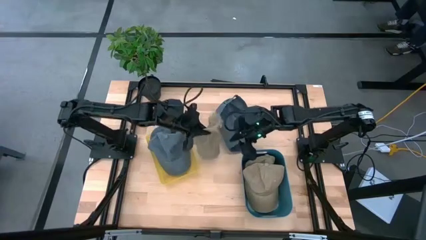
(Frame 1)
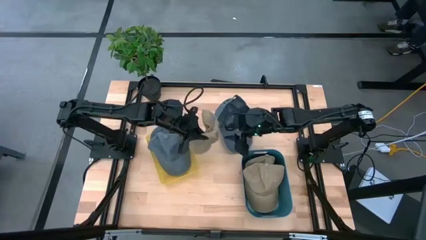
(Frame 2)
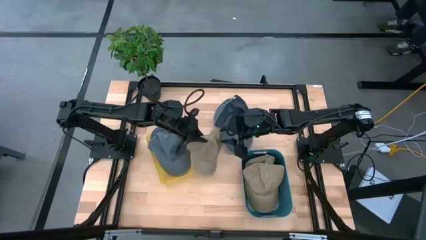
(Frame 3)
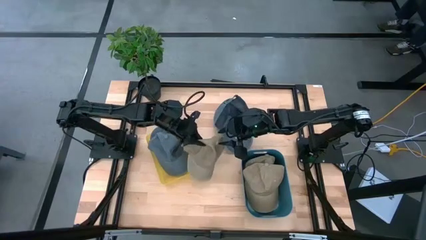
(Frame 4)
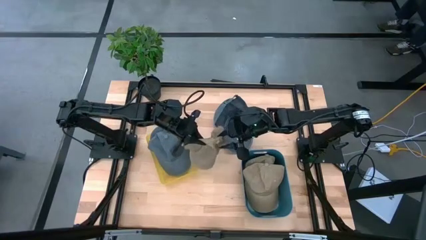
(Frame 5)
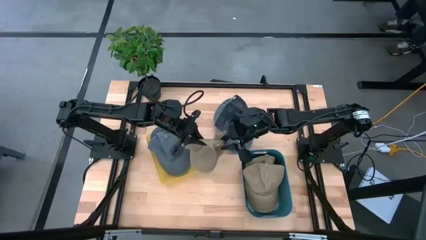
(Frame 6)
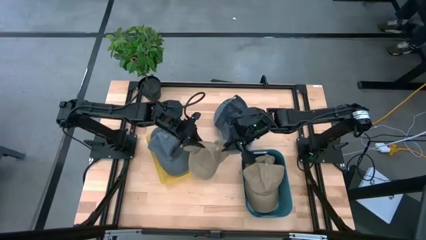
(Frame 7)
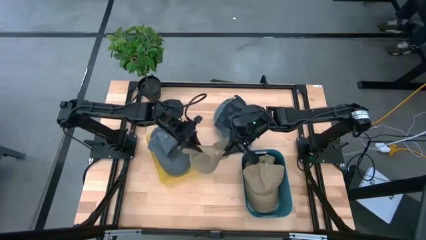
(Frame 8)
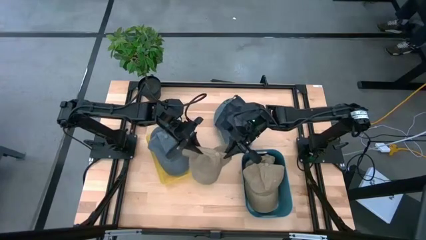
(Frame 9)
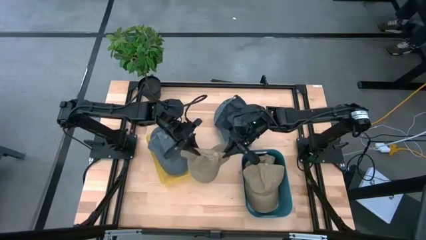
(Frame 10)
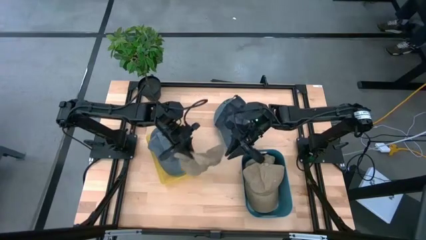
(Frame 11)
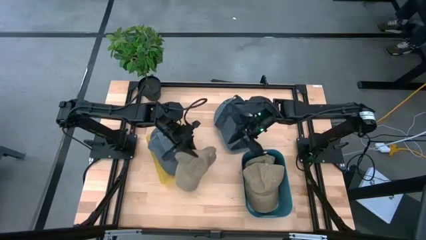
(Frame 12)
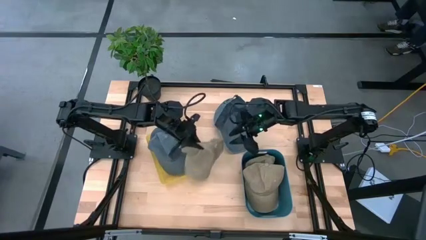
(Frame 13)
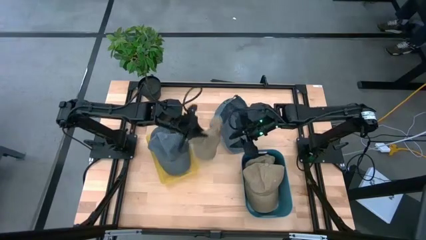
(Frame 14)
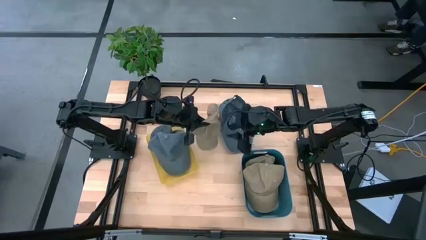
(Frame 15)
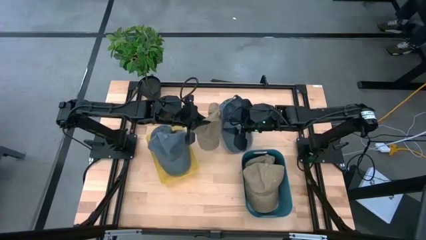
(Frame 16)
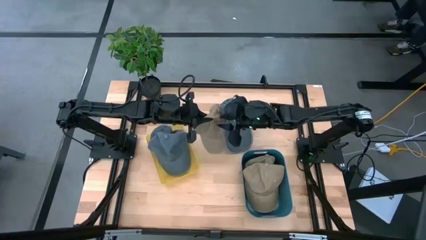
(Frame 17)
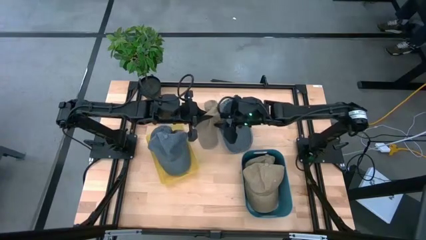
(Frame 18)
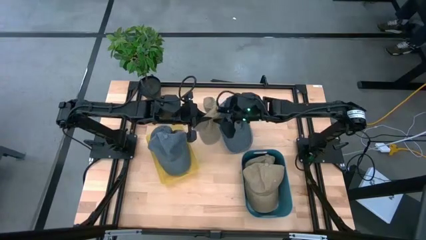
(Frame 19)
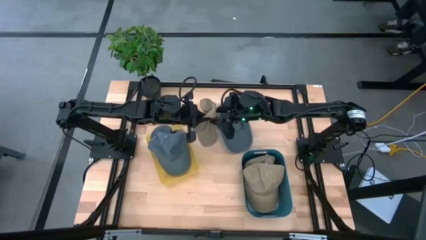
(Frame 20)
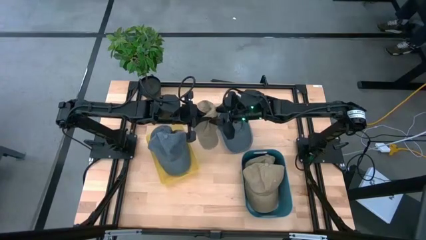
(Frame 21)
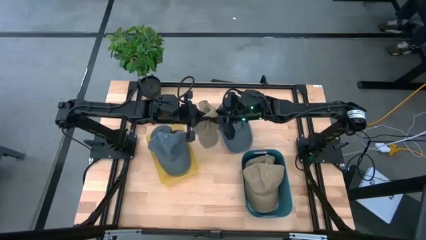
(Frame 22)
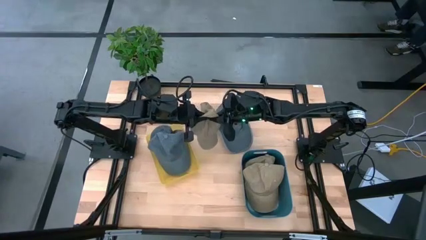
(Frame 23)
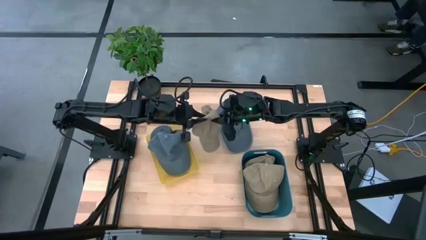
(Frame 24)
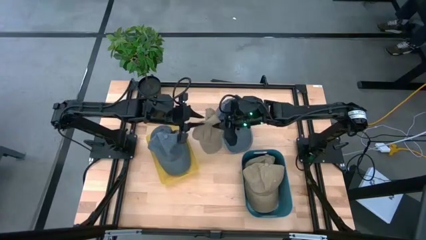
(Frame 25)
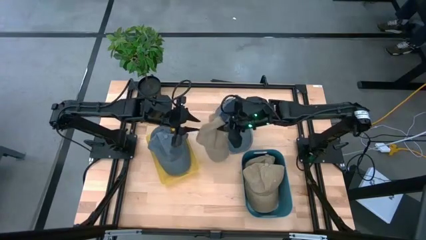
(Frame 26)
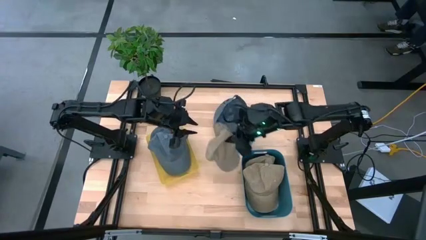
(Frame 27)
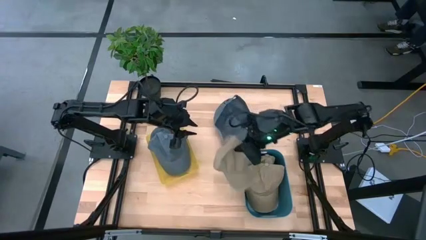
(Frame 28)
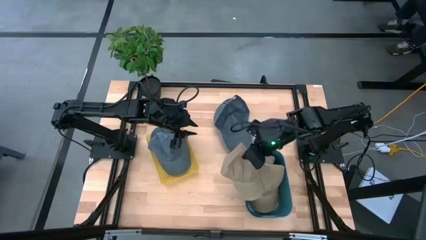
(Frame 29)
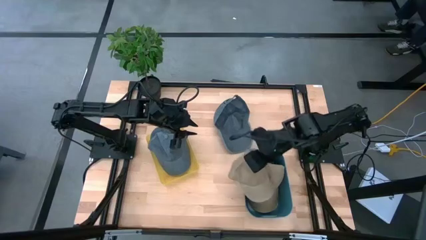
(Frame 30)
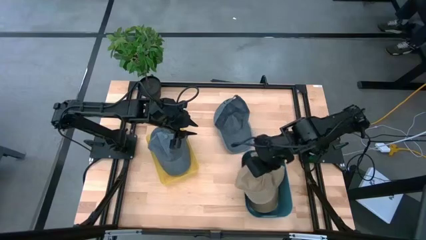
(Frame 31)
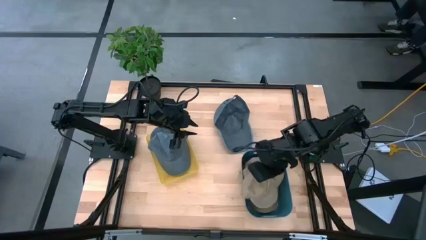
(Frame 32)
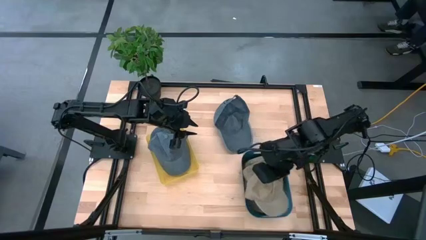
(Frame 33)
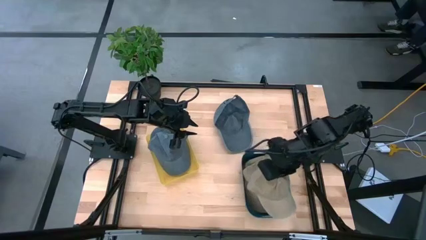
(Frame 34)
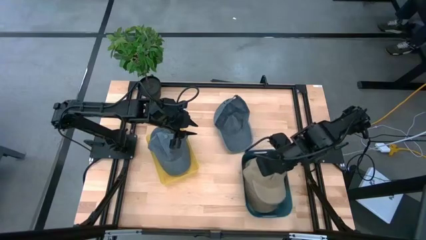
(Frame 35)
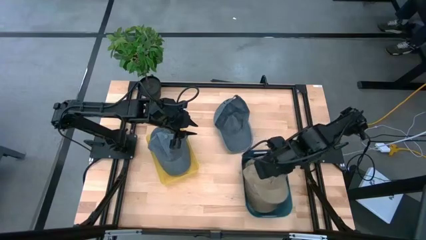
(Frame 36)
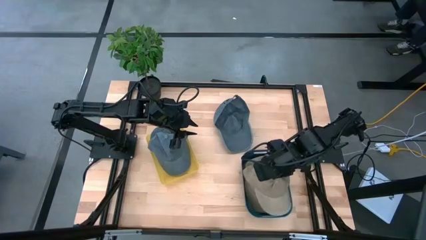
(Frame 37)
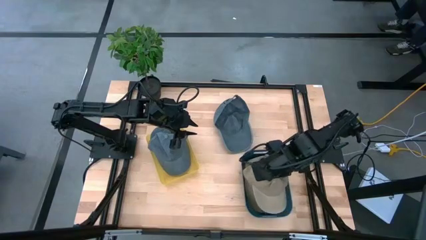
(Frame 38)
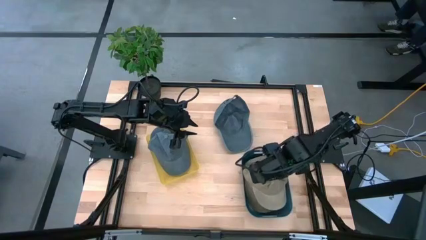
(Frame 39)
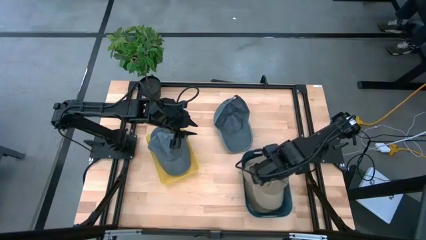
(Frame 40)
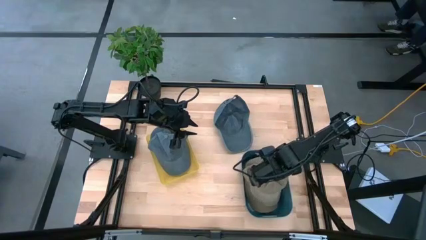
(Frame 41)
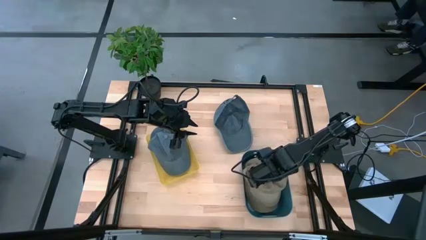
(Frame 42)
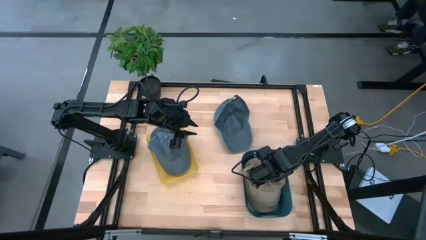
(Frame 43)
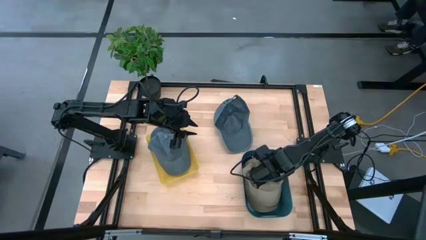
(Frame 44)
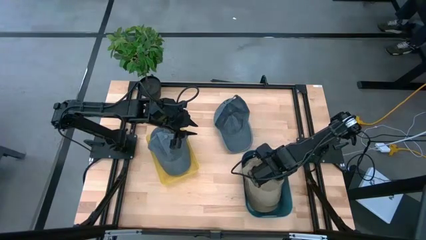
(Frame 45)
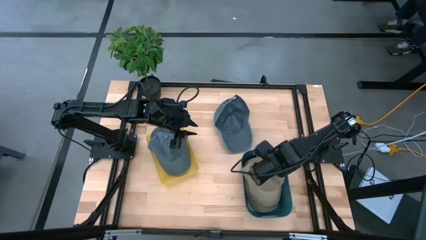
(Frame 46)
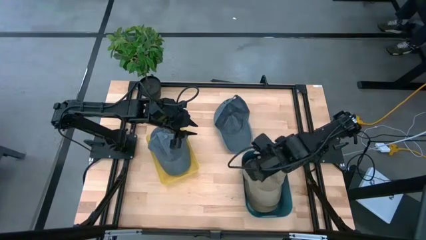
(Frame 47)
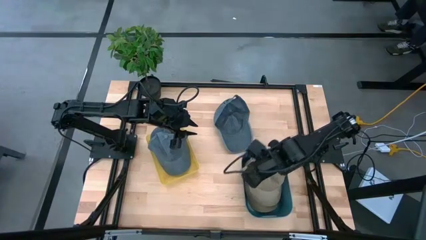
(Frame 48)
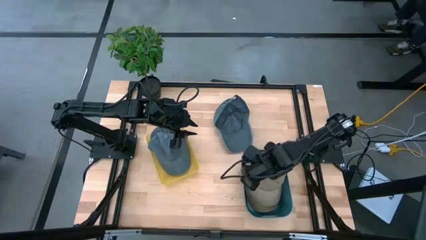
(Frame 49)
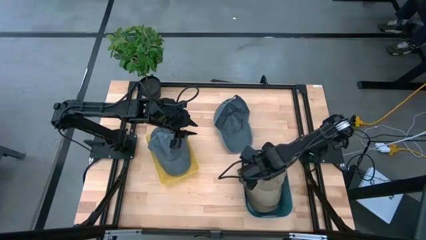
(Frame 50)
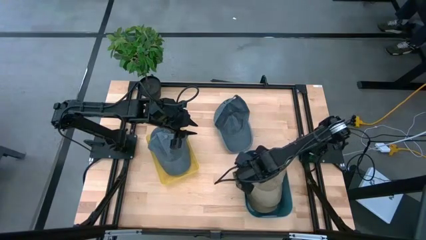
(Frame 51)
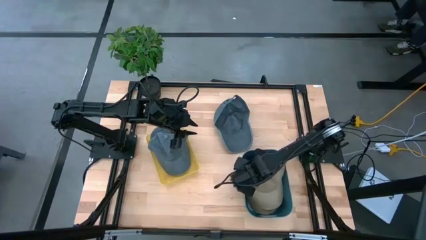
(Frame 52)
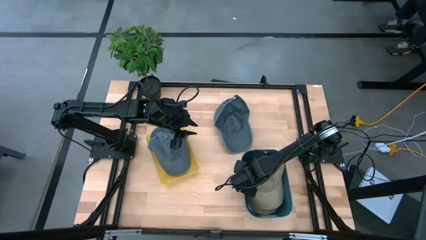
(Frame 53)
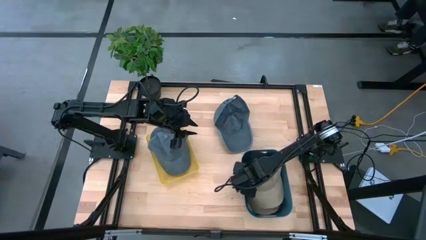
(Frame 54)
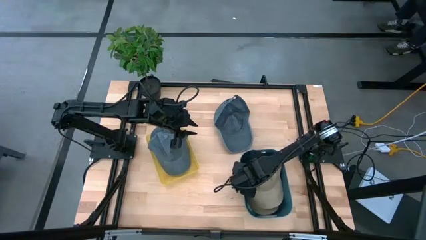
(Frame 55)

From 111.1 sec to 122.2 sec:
Task: Pick & Place hat
Put the brown cap into the yellow bin

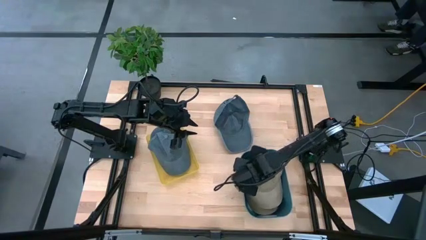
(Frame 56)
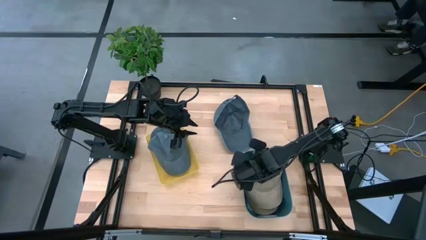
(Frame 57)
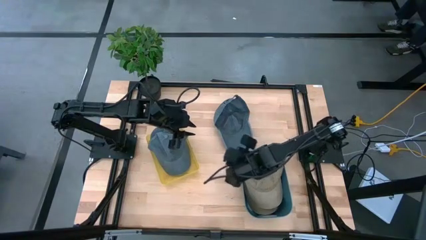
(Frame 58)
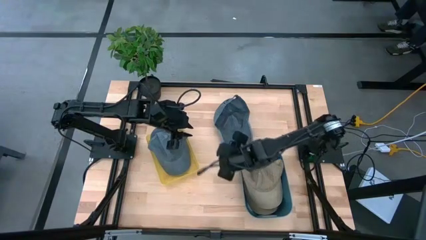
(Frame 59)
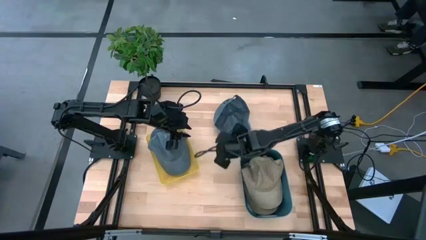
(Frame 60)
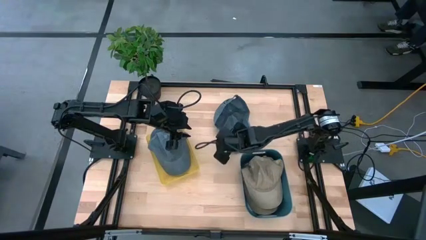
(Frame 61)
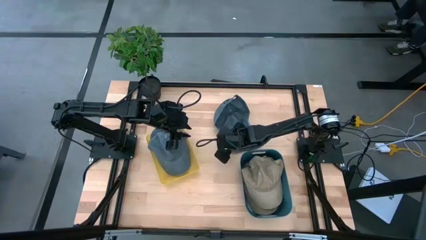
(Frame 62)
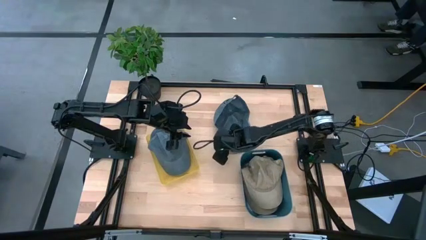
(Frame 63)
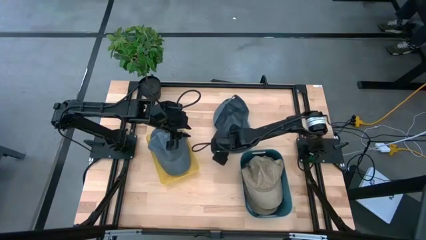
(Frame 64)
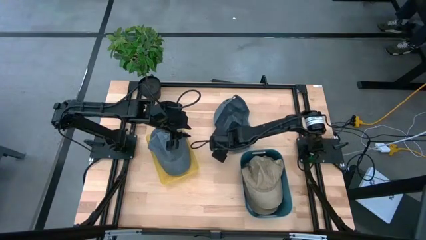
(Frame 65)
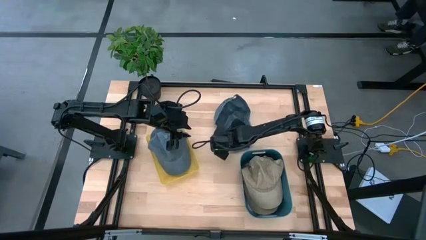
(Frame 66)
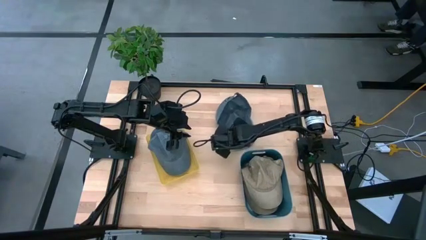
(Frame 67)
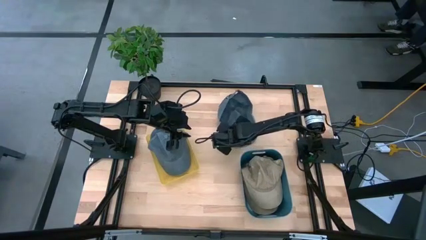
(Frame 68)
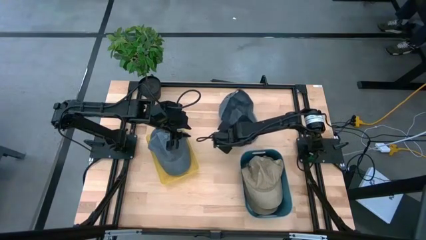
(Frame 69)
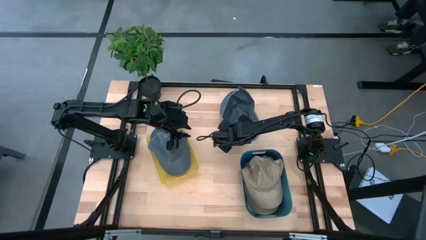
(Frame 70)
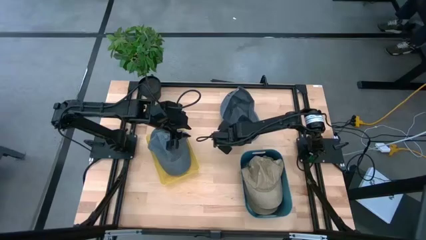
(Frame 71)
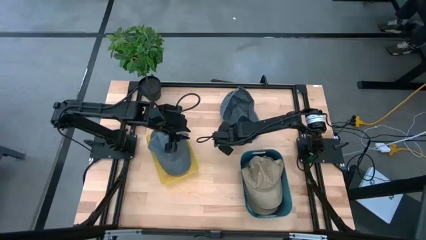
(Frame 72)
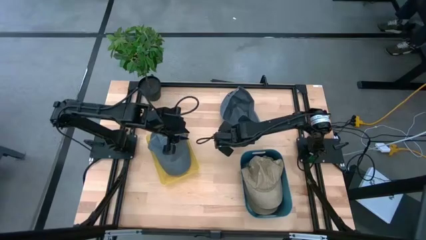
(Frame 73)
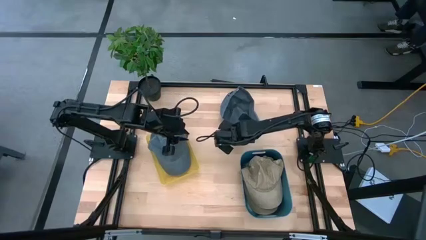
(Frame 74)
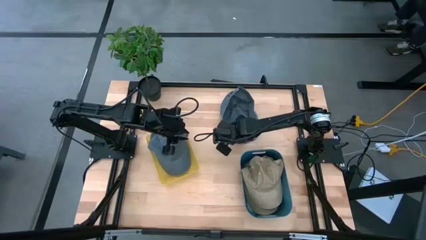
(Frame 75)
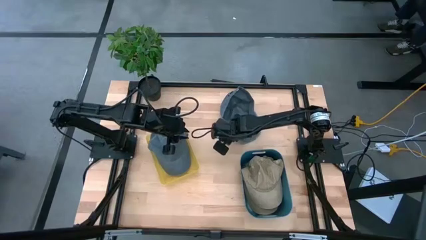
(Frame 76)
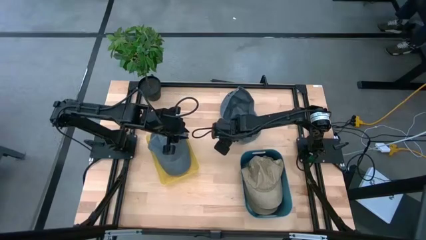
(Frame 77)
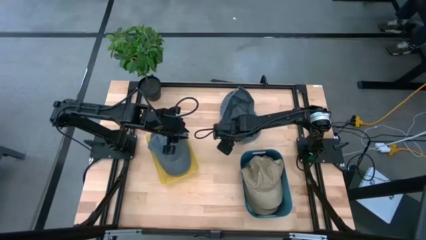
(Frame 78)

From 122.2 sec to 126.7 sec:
Put the gray cap into the blue bin
